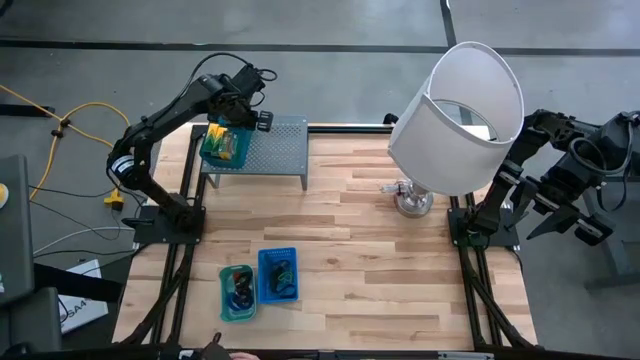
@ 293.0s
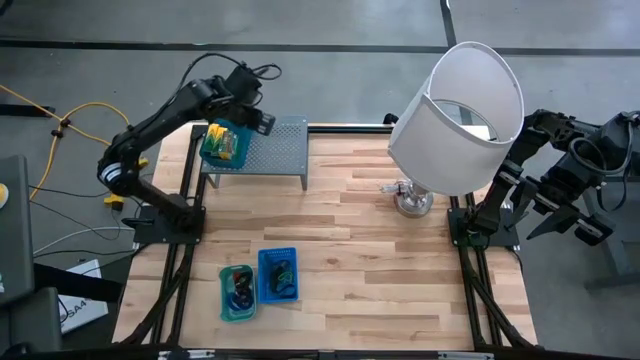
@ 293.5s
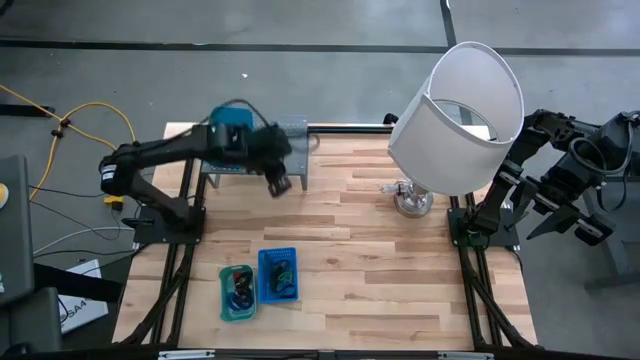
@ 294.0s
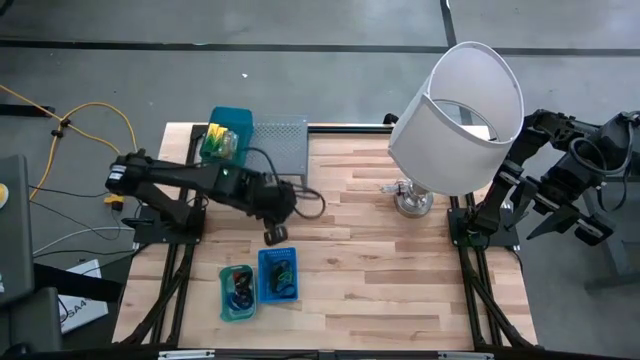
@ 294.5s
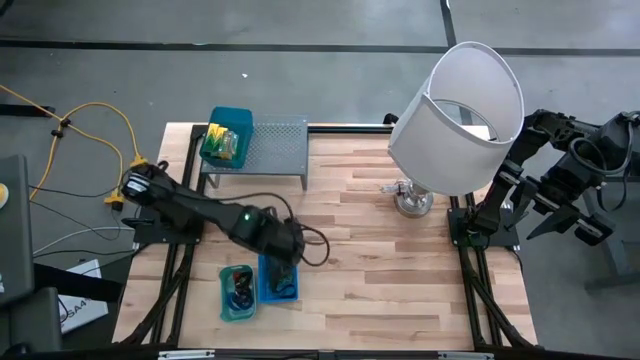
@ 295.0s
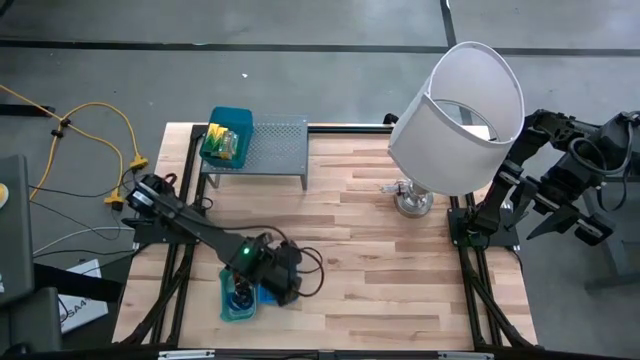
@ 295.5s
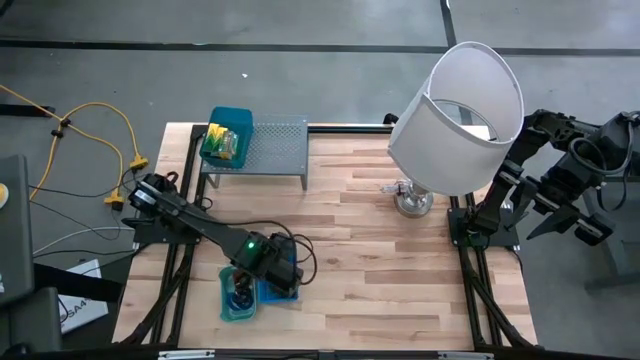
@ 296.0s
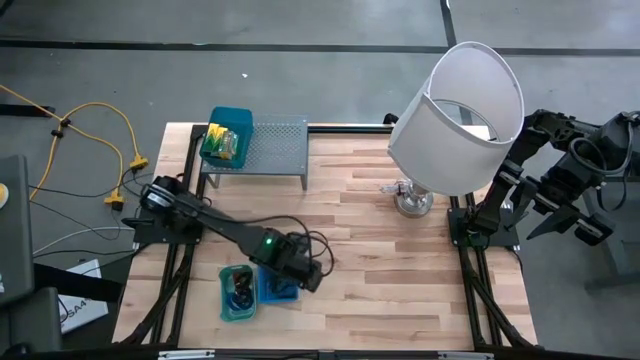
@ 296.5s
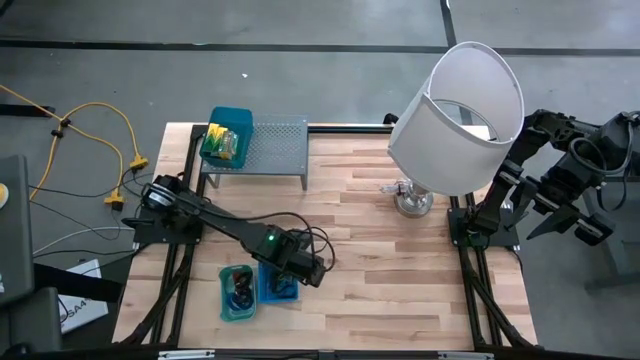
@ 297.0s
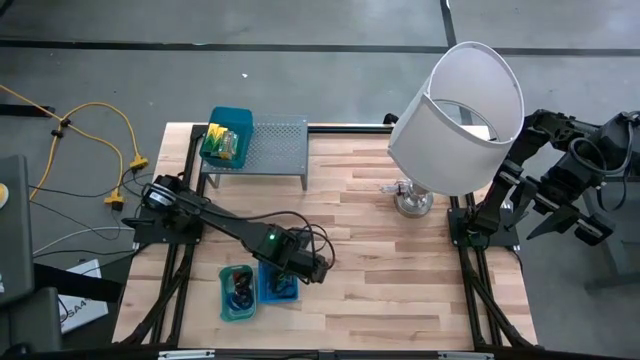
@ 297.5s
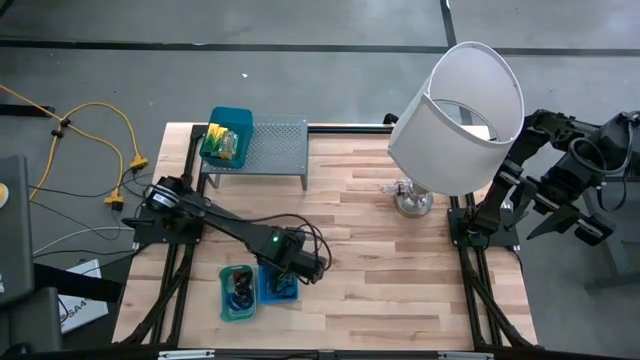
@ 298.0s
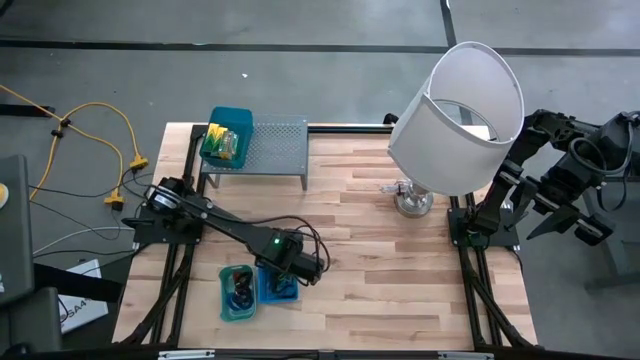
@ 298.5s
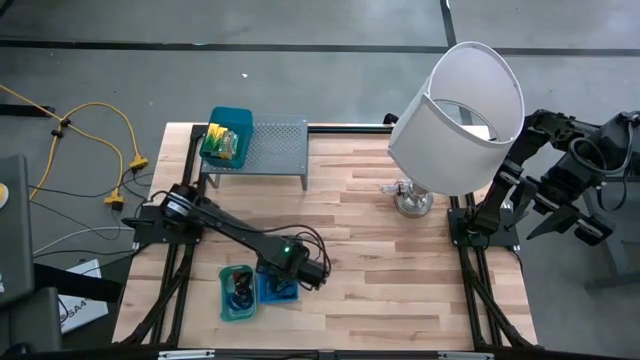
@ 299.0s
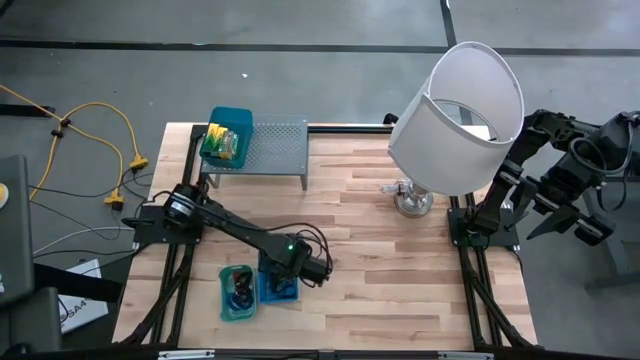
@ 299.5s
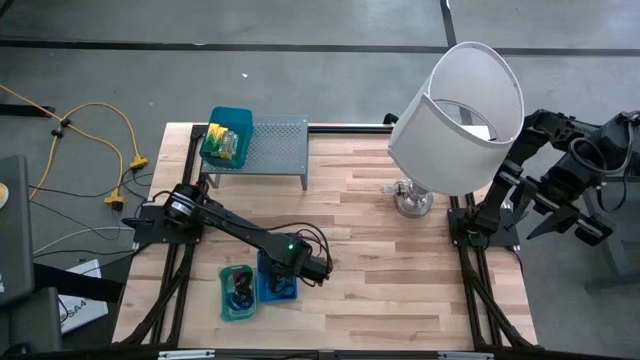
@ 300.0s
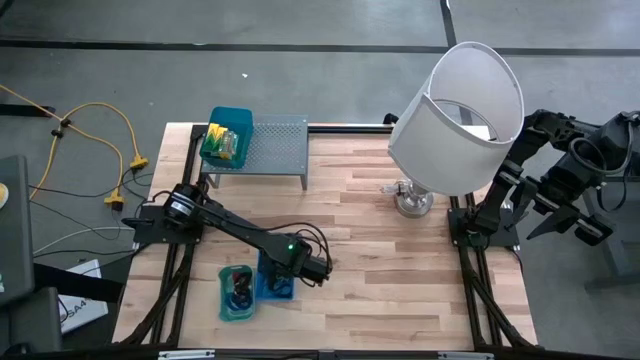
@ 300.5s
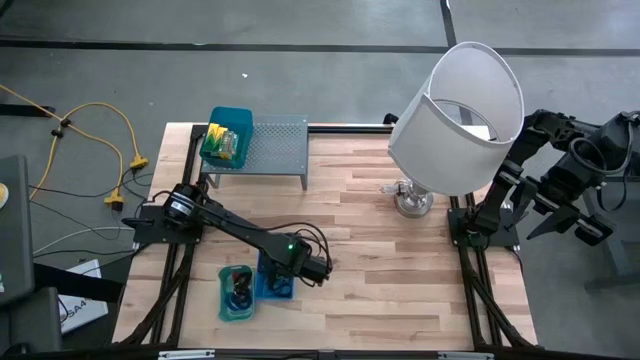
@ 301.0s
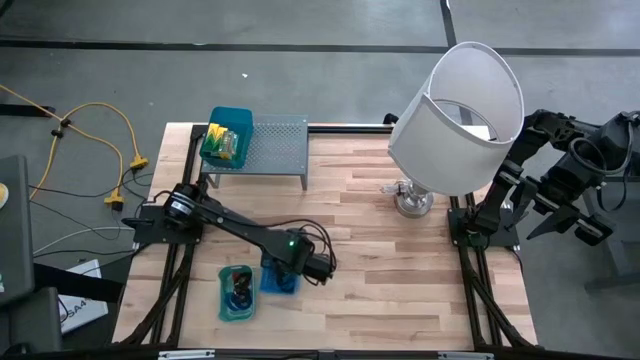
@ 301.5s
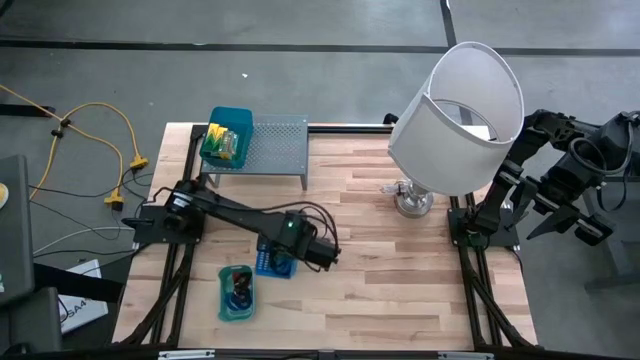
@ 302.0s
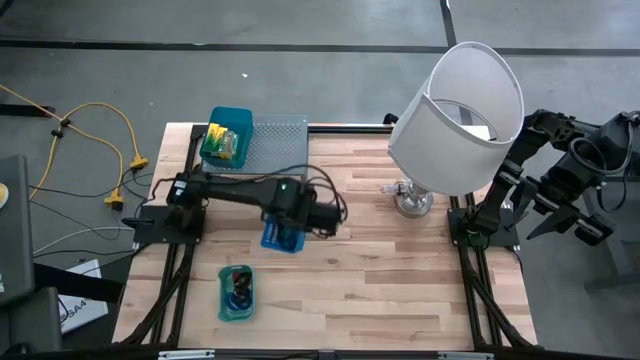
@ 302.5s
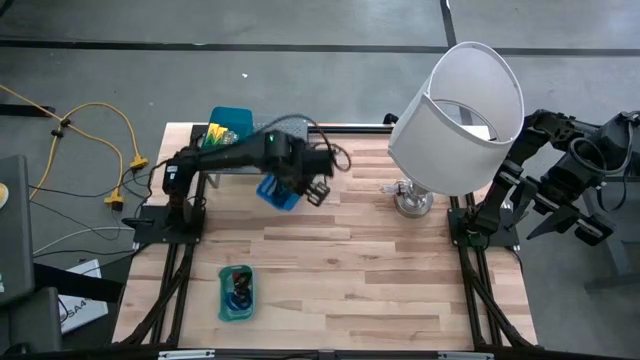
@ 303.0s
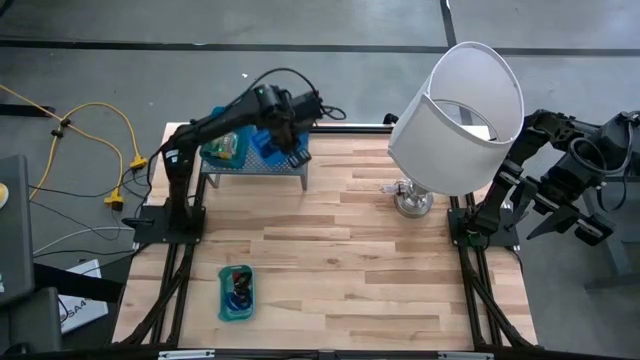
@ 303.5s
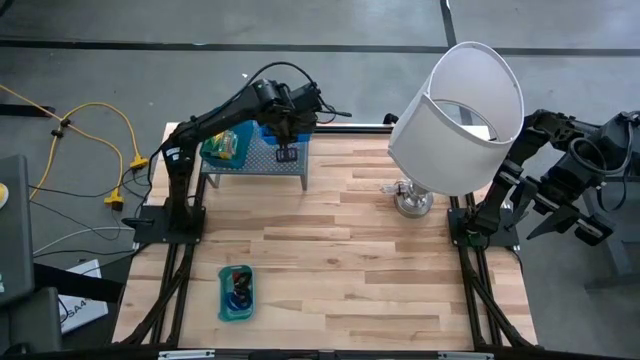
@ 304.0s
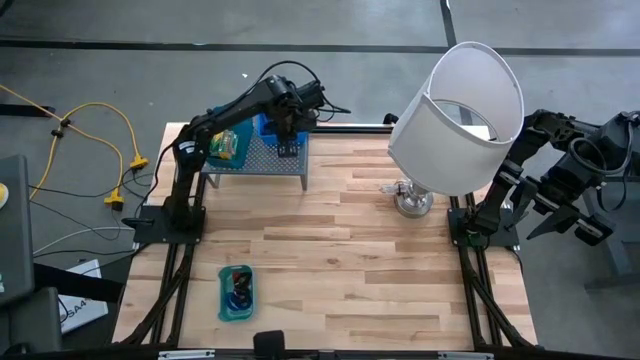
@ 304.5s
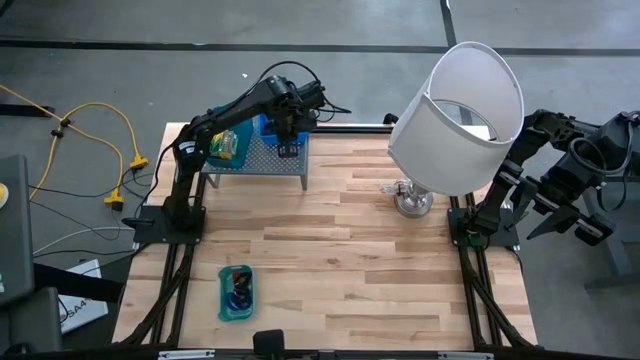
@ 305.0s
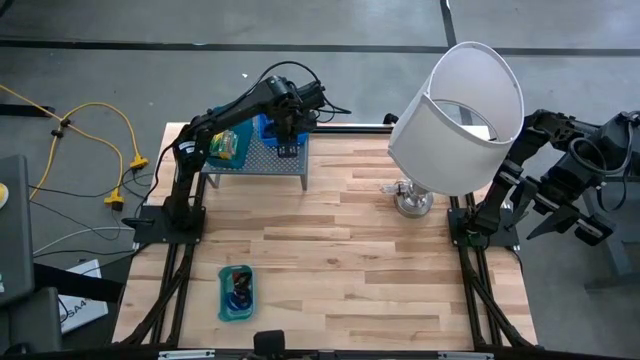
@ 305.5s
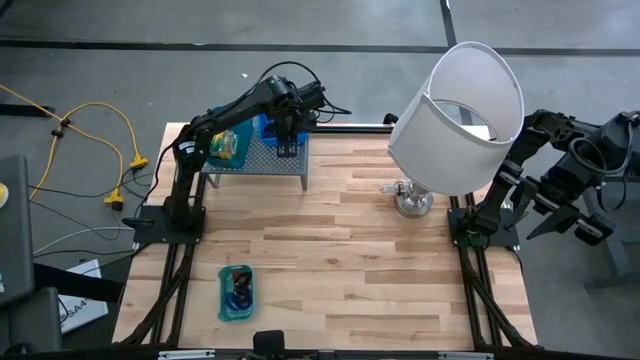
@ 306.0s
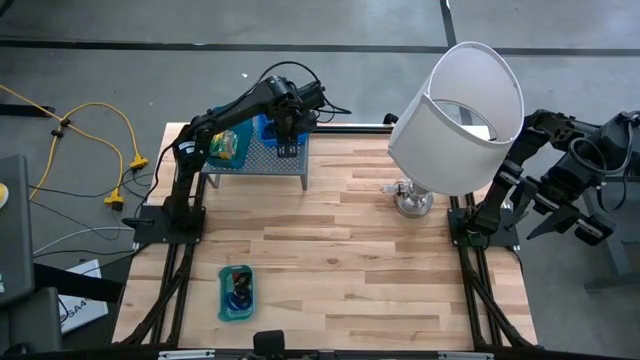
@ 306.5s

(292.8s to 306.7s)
Task: Pick & Place Office Desk Supplies
Put the blue bin on the shelf

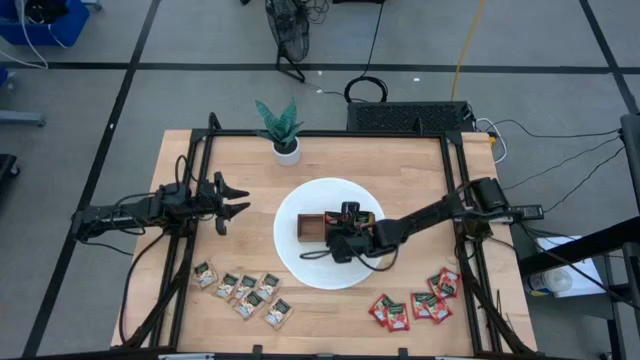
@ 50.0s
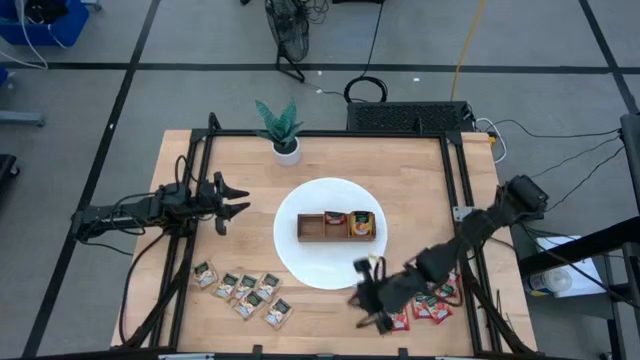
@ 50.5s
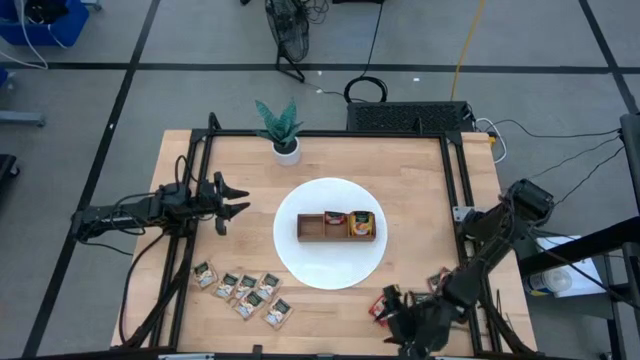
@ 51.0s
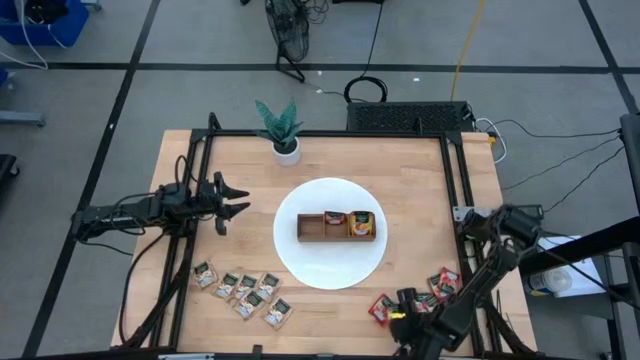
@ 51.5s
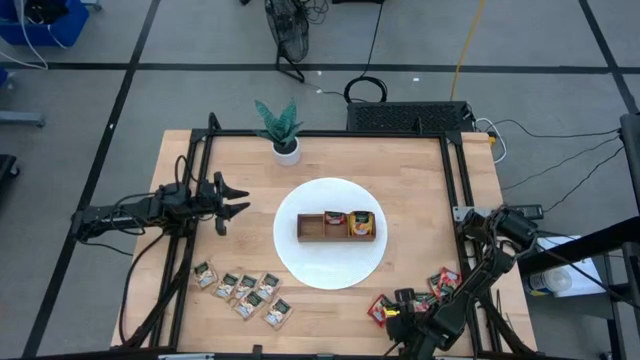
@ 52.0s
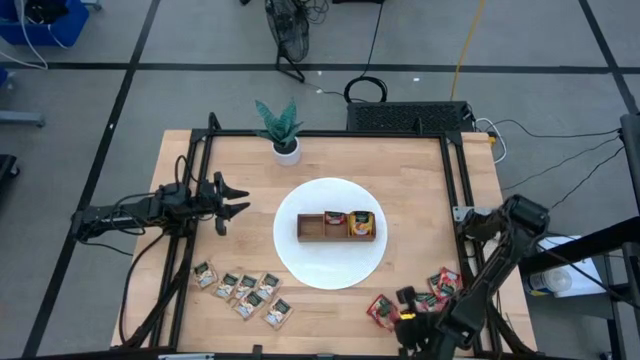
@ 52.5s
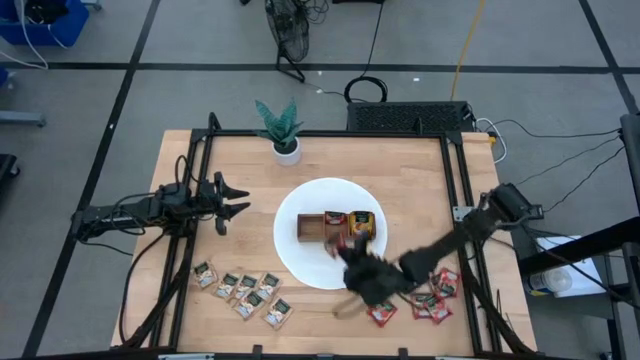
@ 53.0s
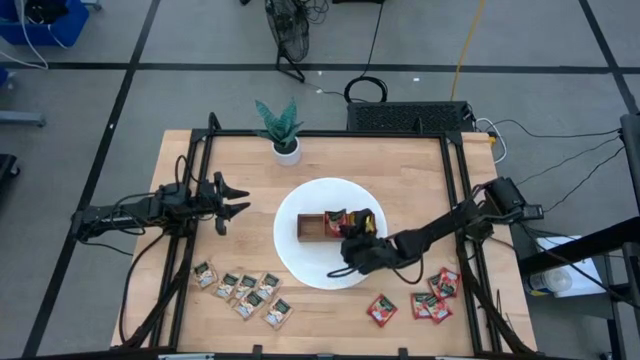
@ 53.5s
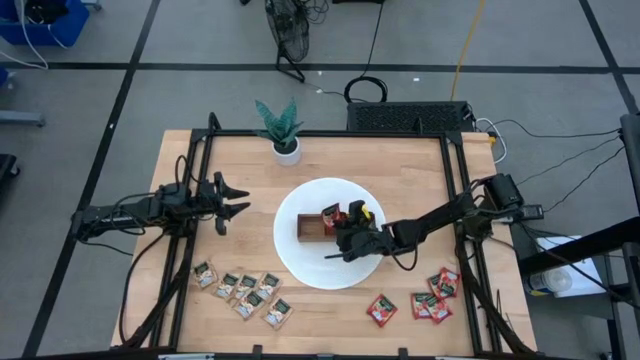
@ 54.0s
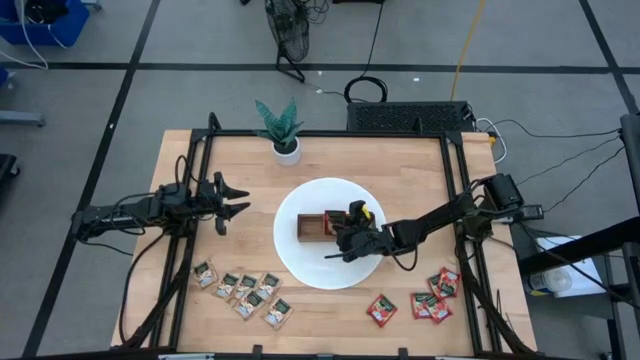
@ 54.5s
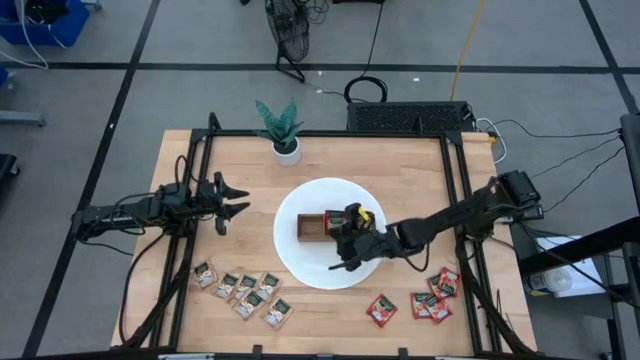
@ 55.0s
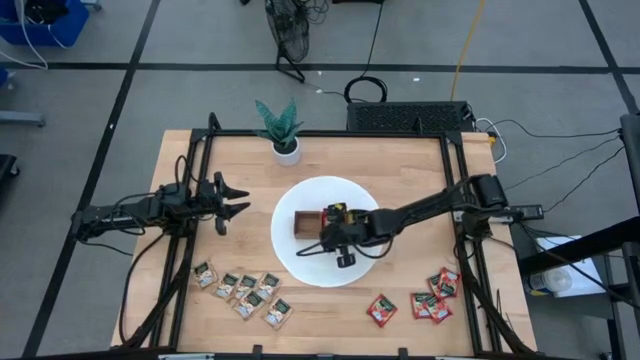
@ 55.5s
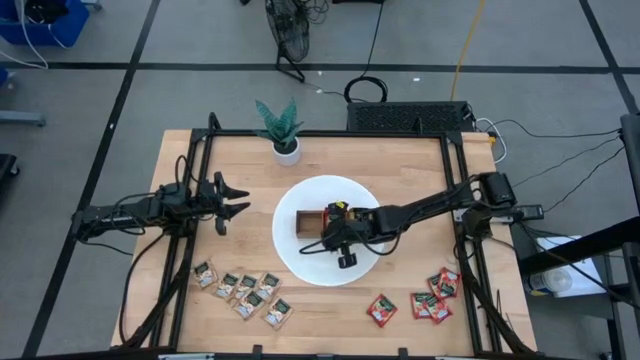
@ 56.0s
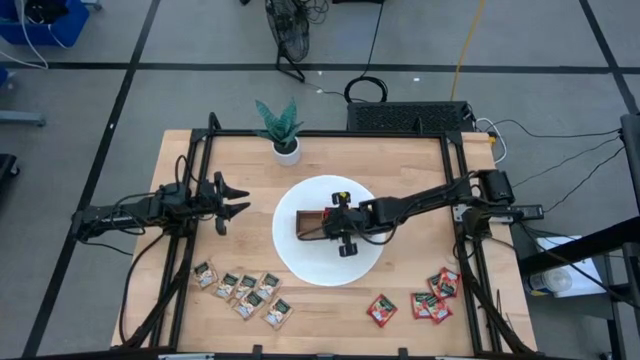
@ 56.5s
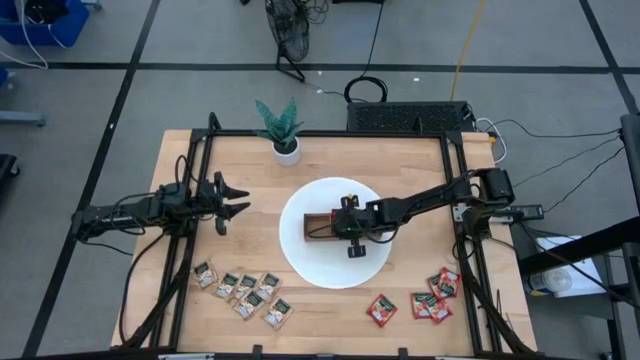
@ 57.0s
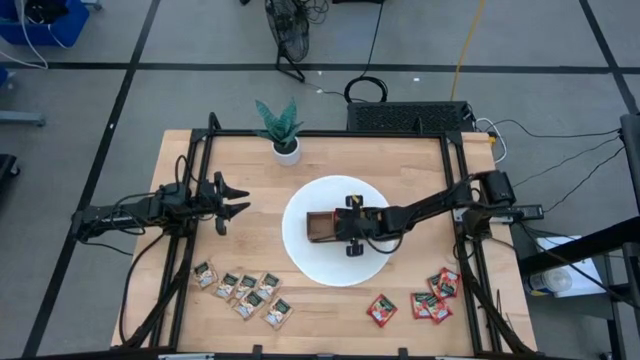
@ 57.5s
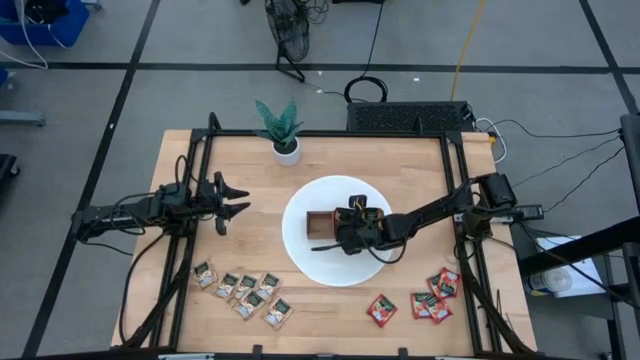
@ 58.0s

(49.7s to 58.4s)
Task: Pick & Place Tea
Put the red tea bag into the middle section of the wooden organizer
